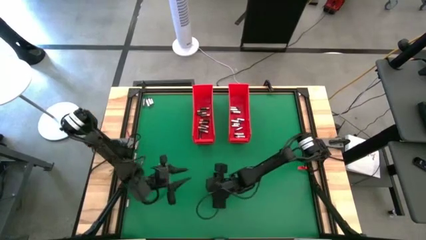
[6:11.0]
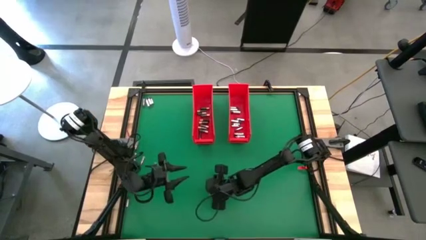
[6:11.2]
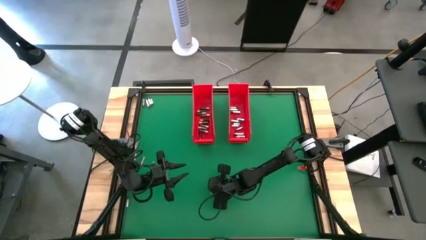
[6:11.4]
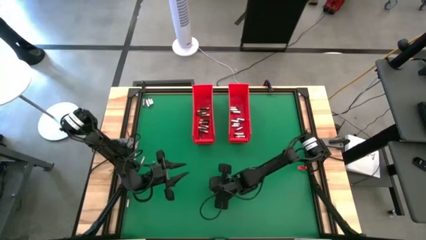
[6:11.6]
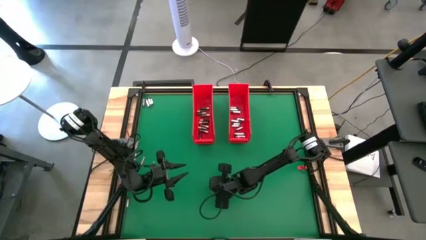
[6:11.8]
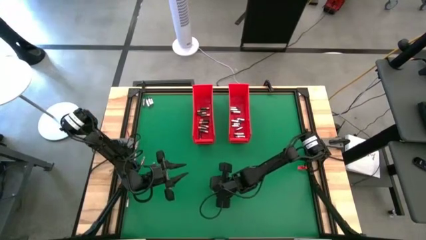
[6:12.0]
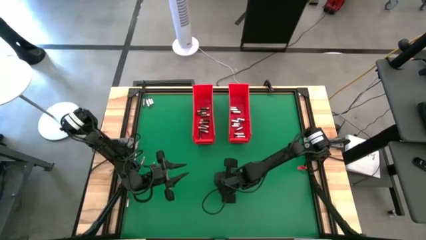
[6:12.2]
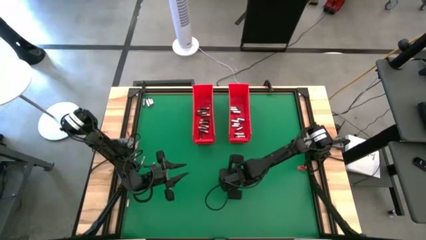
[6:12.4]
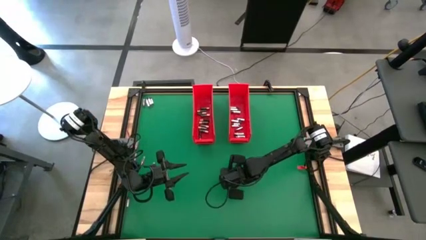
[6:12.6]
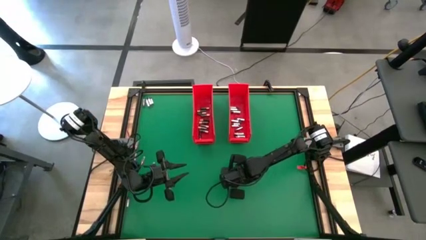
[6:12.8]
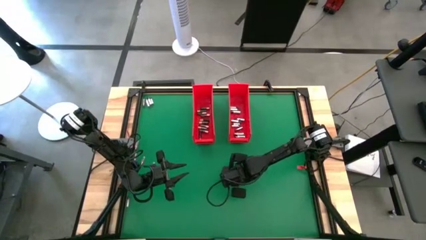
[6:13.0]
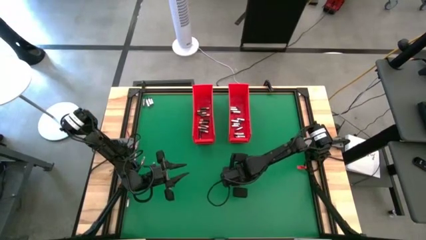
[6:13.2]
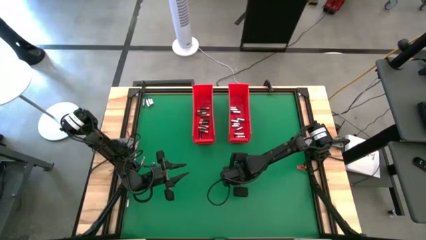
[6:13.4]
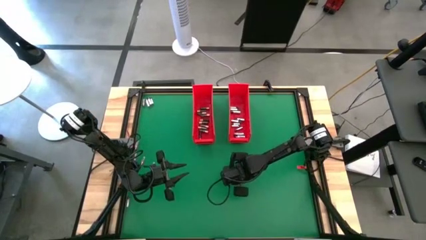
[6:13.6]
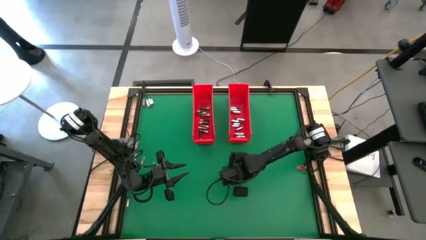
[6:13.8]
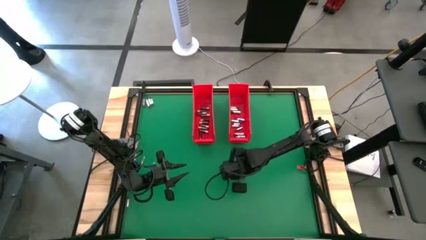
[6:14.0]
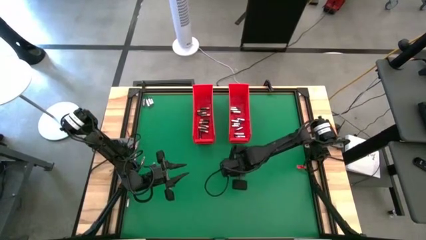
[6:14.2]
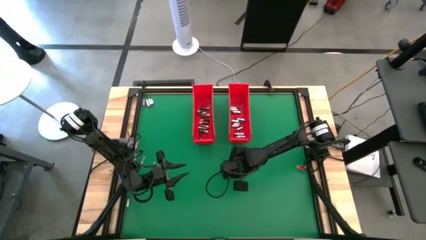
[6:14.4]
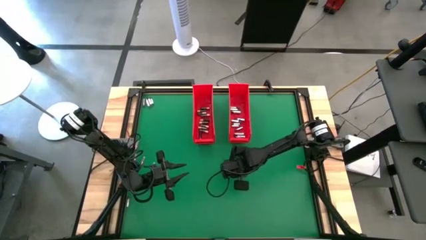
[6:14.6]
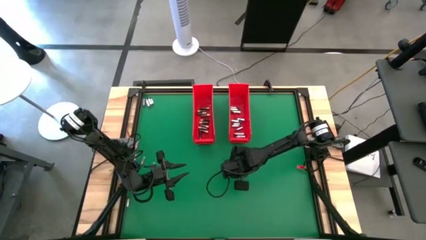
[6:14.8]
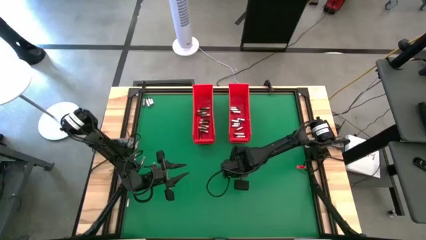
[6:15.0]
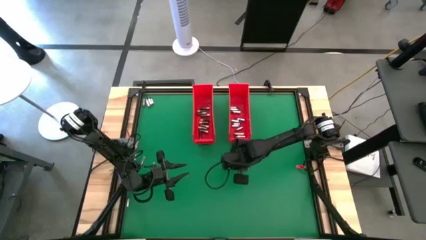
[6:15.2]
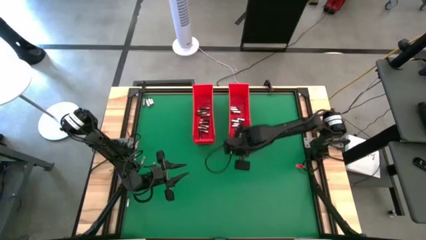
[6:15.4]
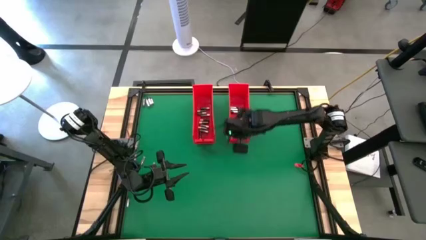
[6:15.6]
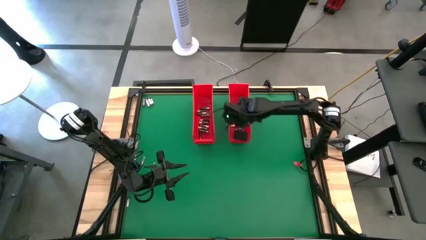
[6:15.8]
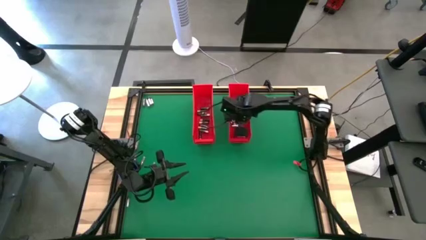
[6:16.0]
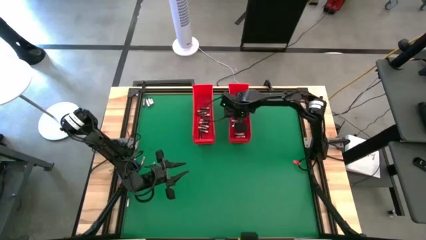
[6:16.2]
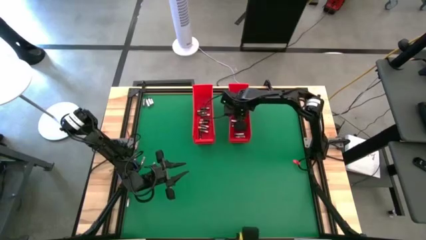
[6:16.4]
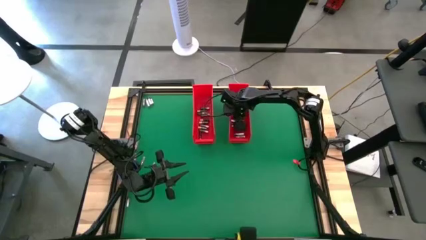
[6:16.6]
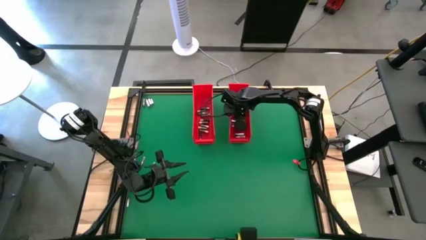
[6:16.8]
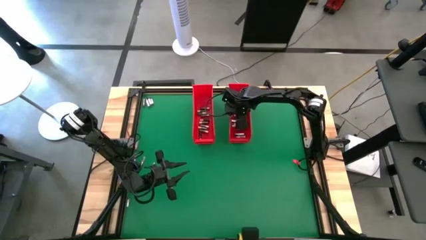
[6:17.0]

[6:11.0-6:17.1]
Task: Sort batteries
Put the silver battery into the right red bin

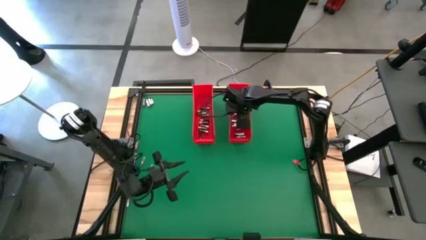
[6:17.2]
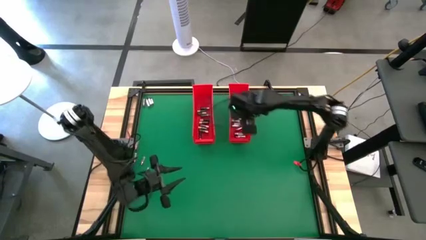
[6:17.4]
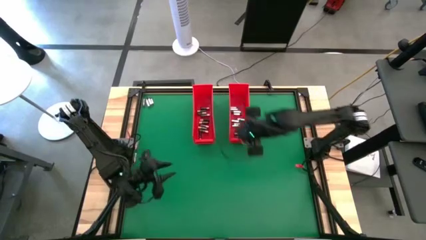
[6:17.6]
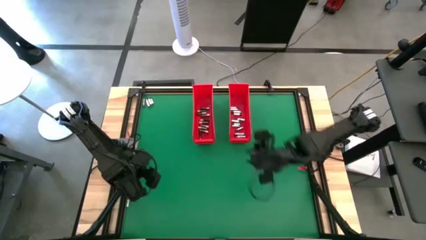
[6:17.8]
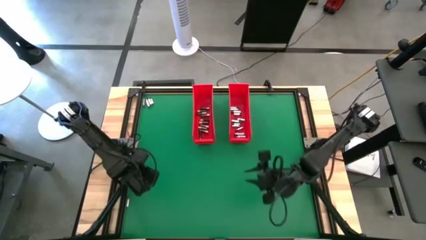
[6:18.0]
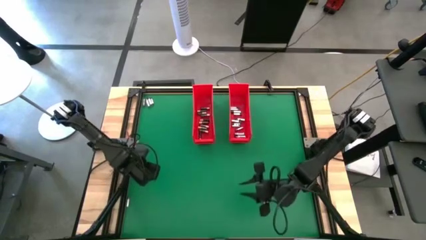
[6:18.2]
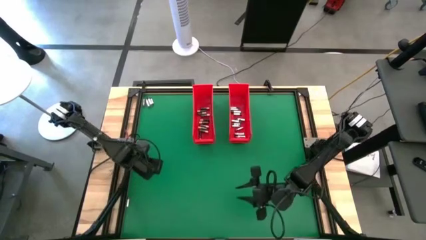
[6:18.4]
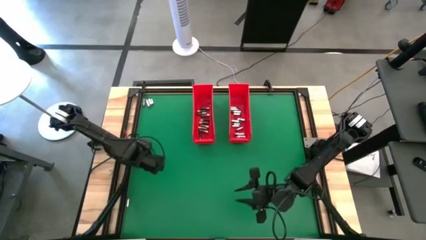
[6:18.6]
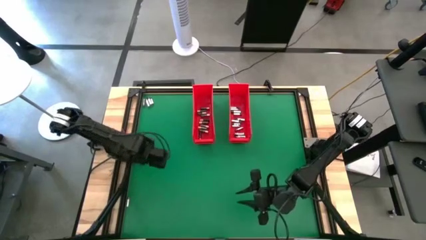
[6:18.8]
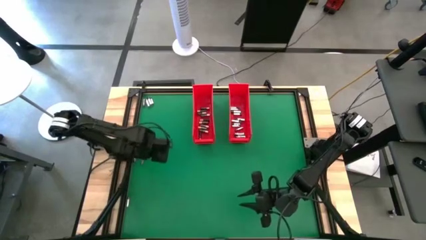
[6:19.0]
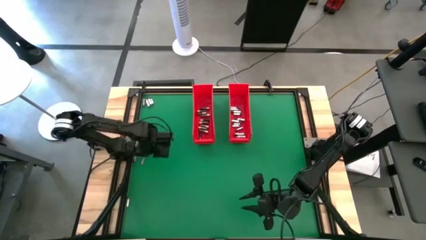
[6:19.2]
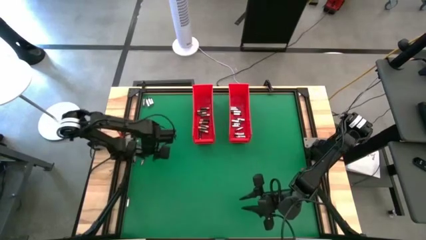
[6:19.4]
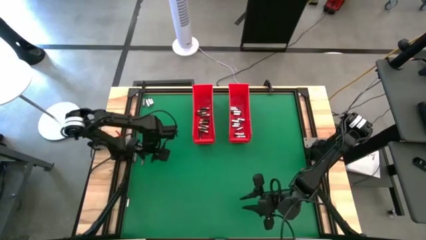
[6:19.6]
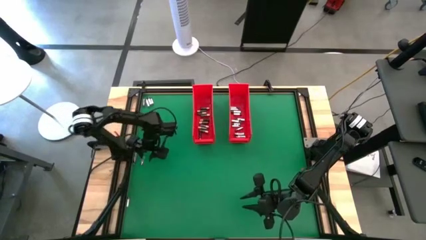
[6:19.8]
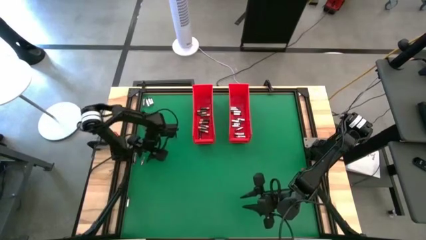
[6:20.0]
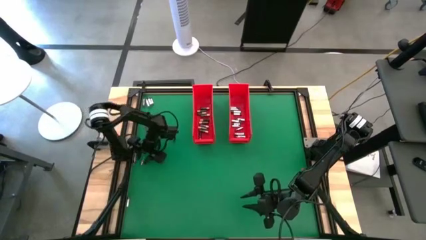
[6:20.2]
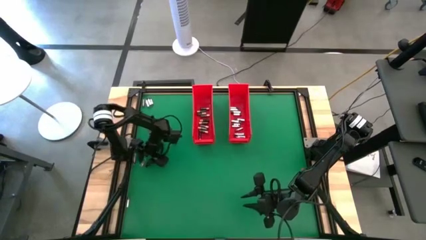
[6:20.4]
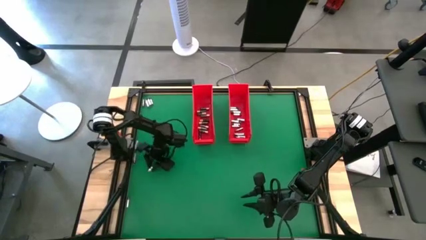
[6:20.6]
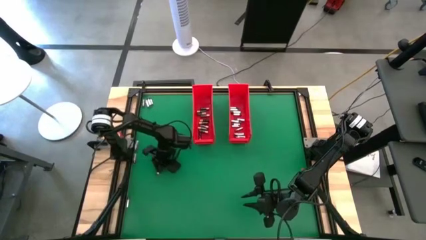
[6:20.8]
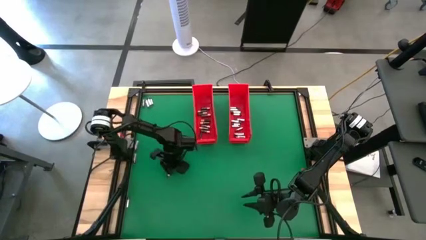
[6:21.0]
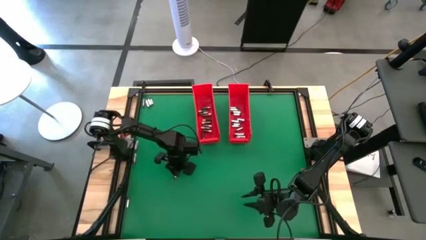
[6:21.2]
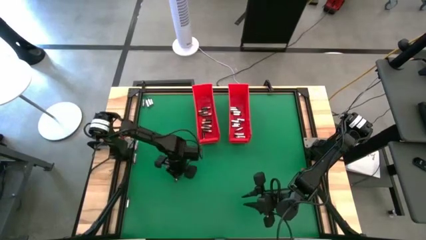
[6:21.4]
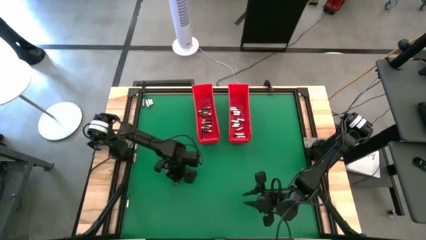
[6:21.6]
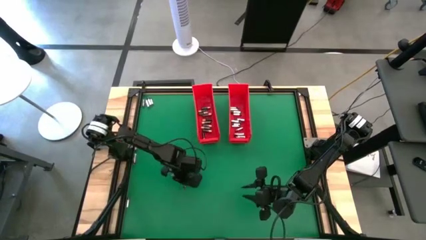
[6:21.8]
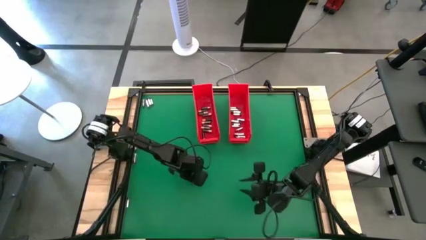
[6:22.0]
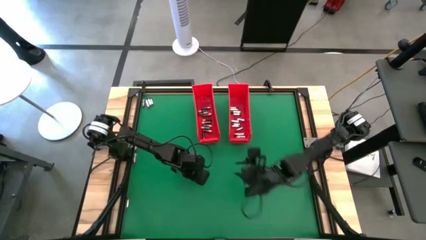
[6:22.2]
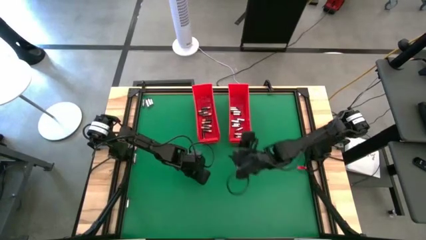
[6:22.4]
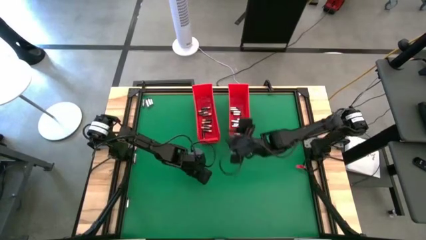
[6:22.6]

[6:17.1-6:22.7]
Put the silver battery into the right red bin

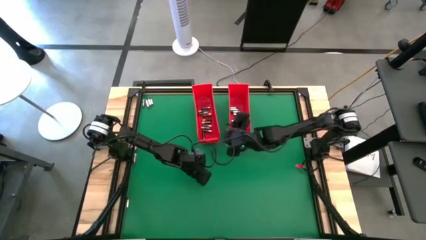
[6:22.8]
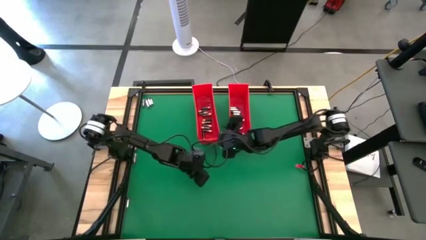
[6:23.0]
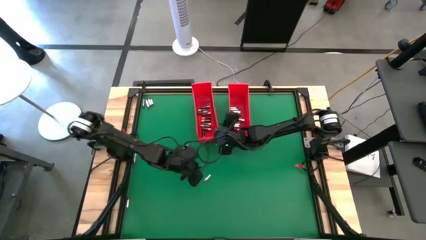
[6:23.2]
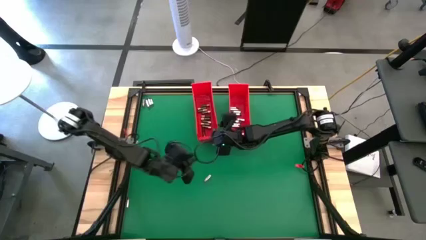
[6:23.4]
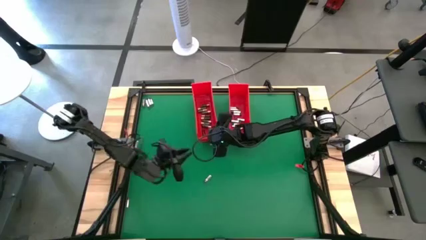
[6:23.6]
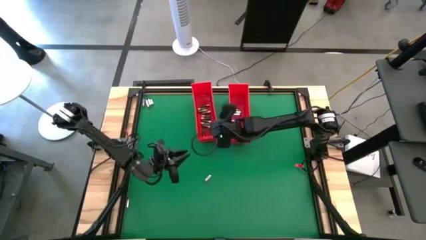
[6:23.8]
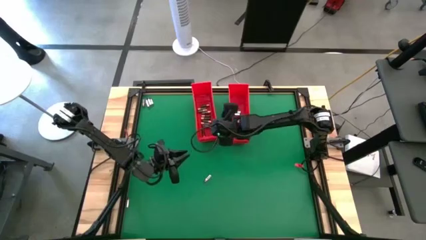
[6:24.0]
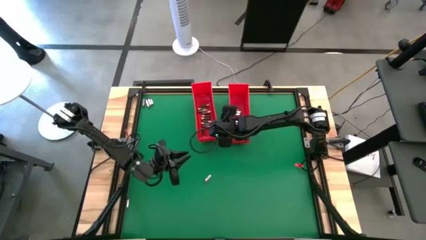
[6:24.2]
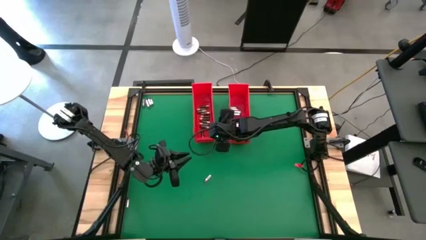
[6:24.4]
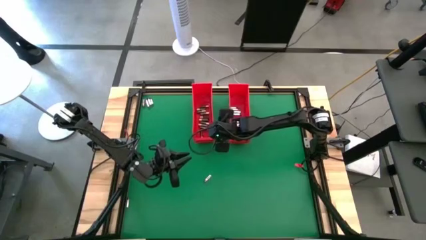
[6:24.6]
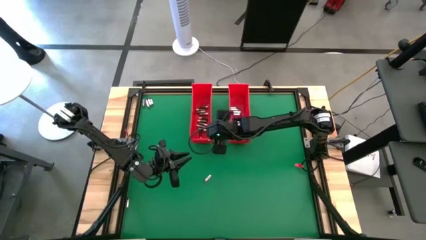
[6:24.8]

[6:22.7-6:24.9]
Adjust the left red bin

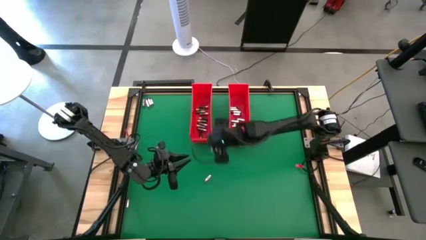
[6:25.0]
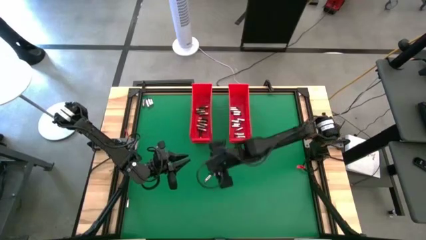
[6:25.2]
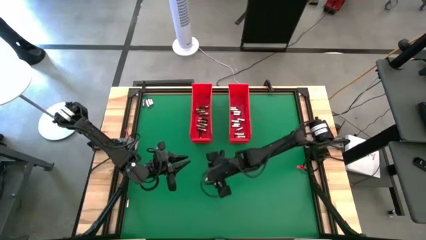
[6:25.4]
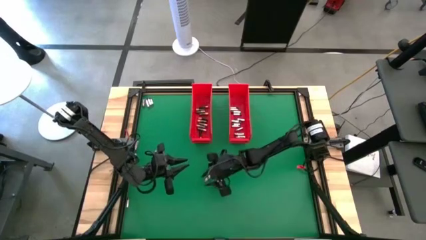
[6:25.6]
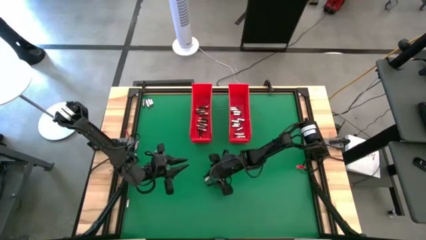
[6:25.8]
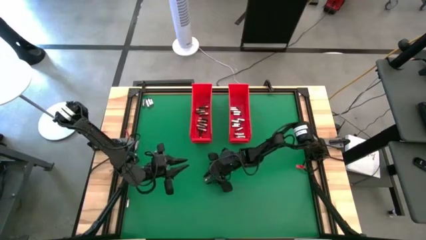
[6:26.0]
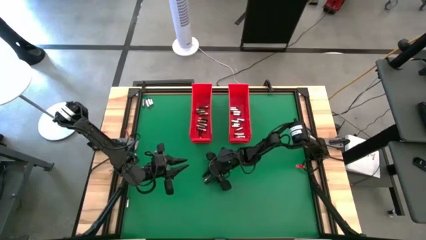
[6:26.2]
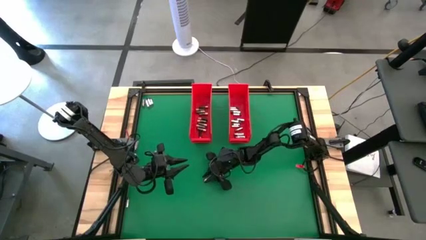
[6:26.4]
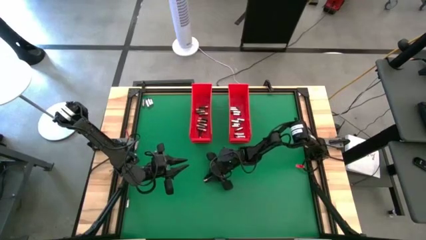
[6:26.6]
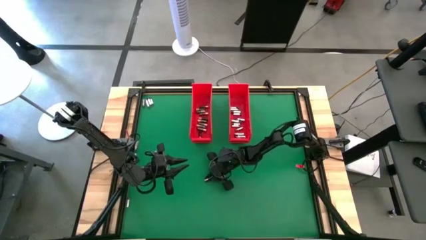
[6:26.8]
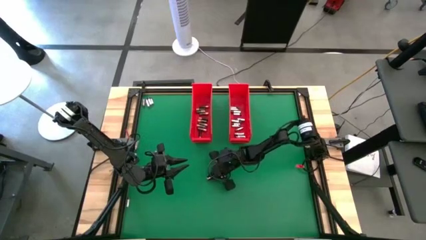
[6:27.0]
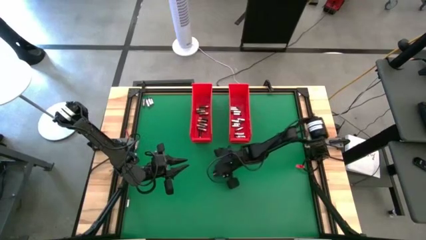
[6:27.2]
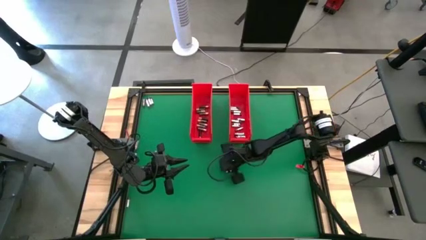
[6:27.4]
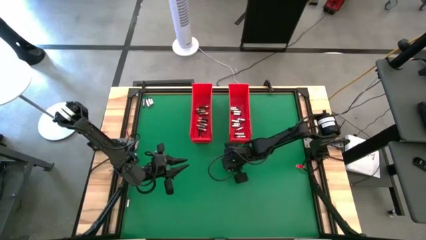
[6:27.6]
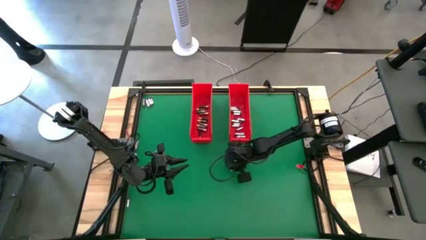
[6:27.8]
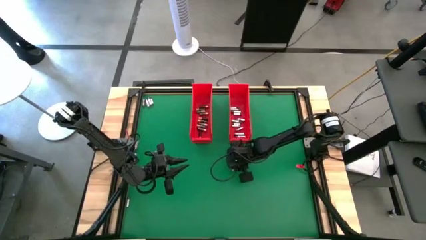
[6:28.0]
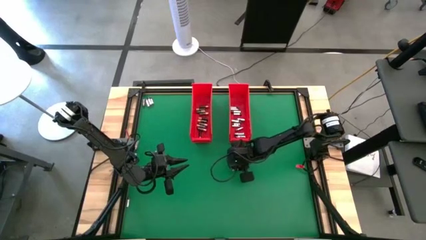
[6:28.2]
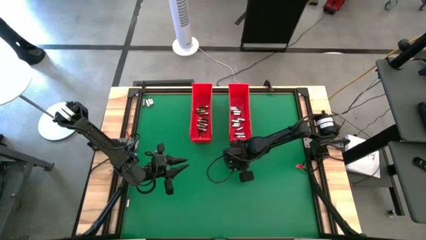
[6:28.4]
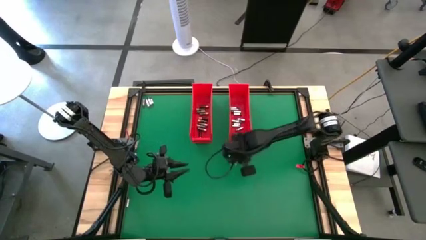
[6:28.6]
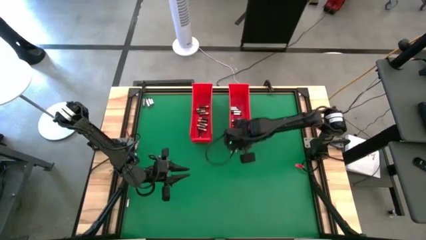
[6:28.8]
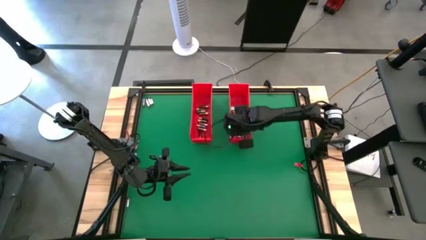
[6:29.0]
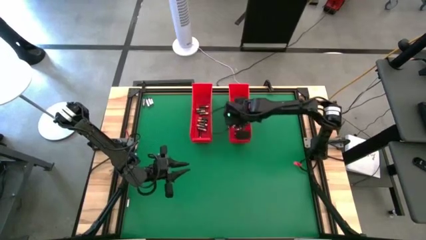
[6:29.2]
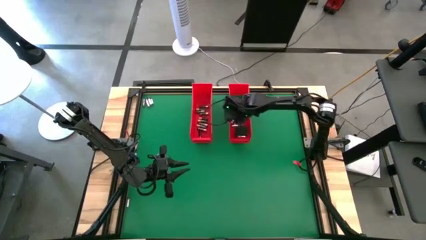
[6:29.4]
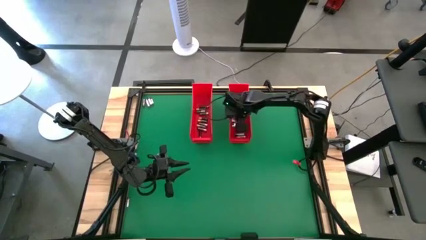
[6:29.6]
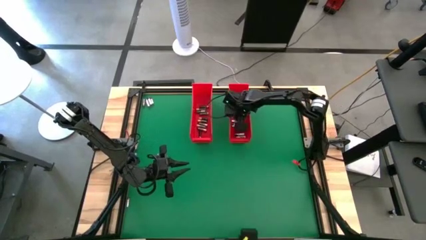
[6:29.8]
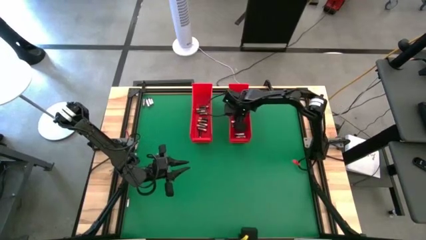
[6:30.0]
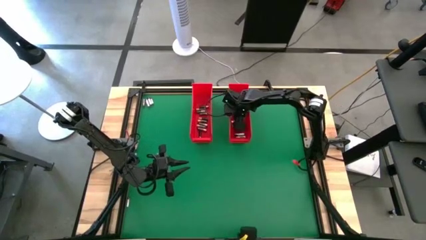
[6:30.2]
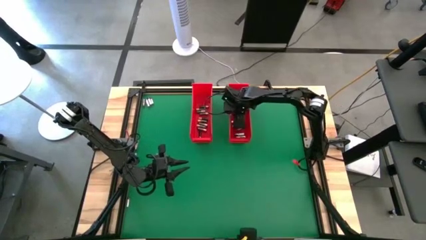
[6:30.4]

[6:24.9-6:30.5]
Put the silver battery into the right red bin
